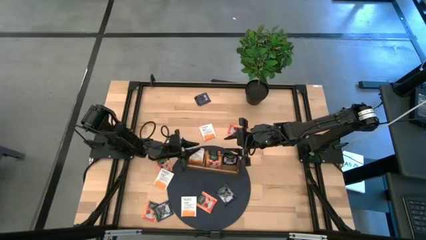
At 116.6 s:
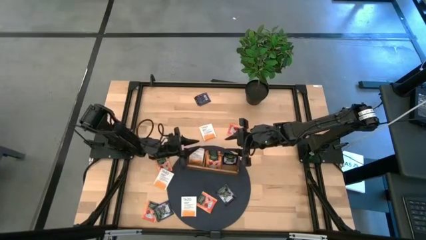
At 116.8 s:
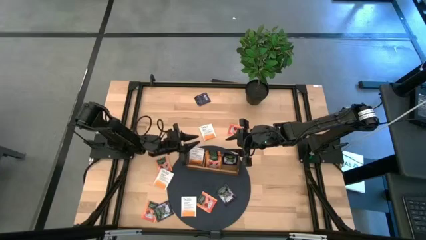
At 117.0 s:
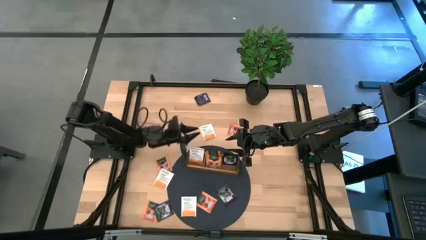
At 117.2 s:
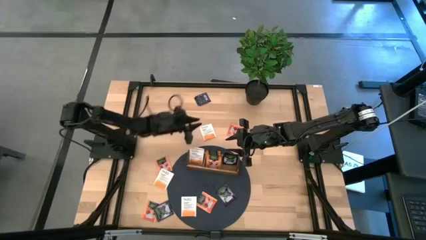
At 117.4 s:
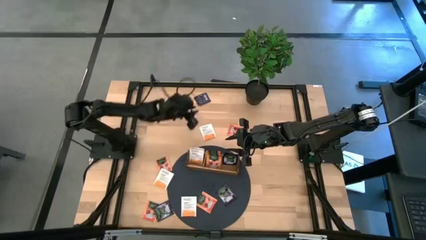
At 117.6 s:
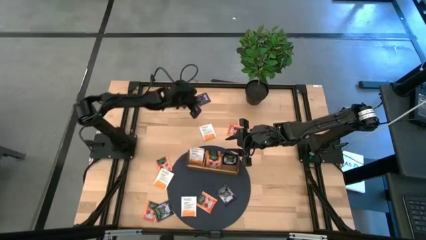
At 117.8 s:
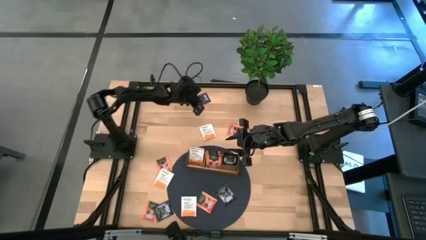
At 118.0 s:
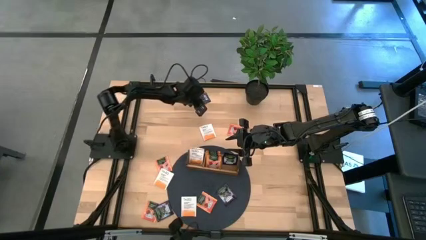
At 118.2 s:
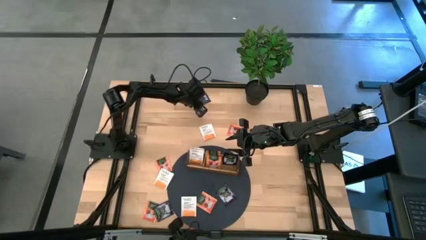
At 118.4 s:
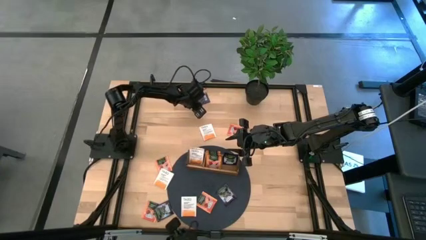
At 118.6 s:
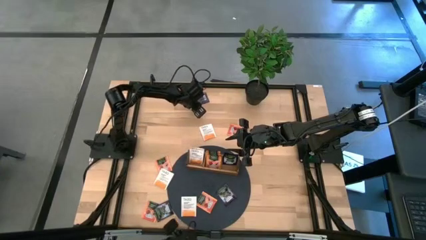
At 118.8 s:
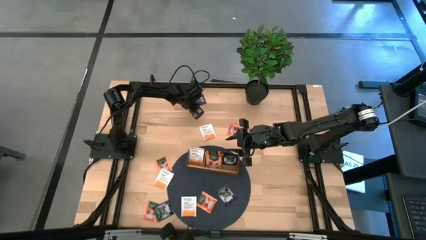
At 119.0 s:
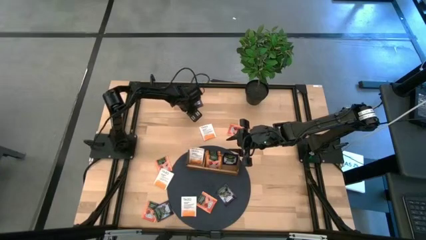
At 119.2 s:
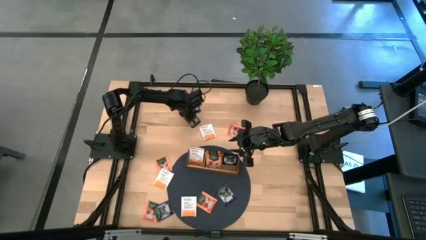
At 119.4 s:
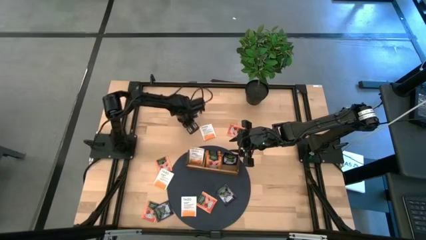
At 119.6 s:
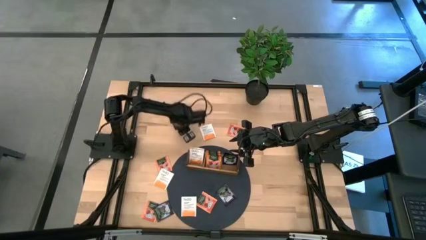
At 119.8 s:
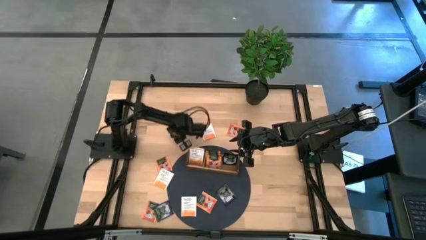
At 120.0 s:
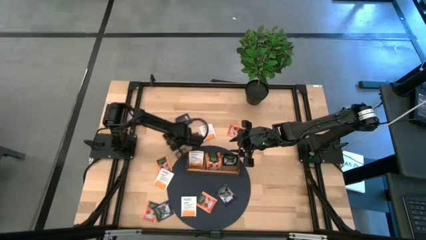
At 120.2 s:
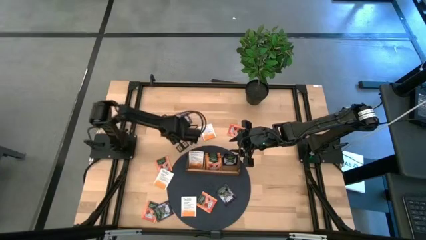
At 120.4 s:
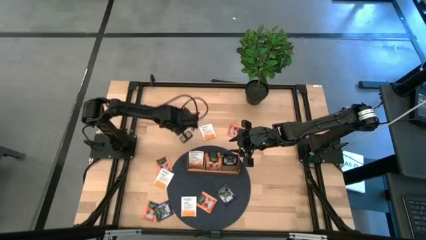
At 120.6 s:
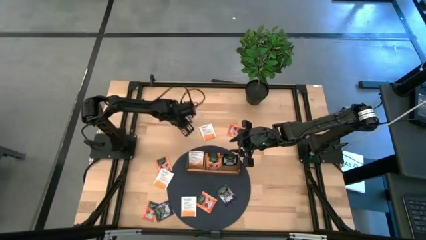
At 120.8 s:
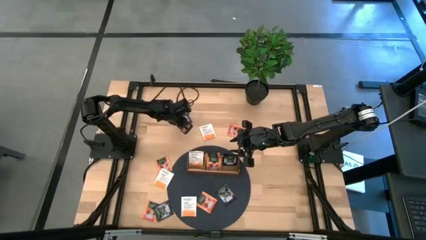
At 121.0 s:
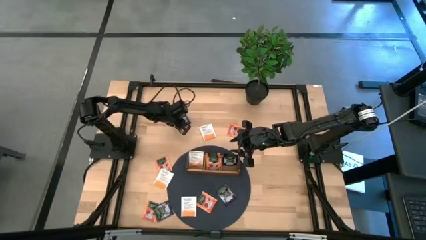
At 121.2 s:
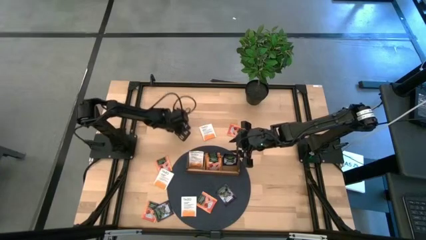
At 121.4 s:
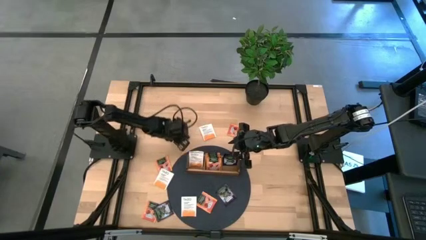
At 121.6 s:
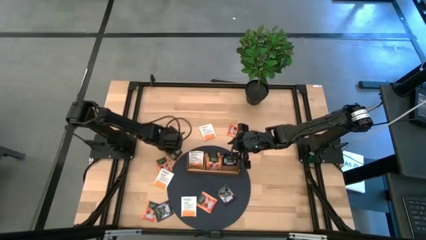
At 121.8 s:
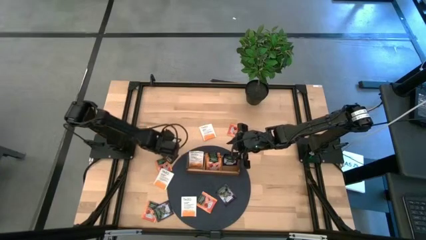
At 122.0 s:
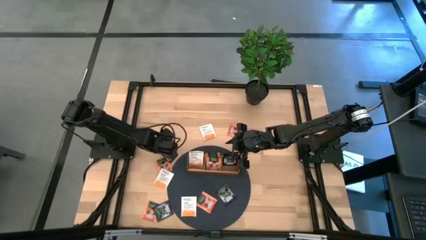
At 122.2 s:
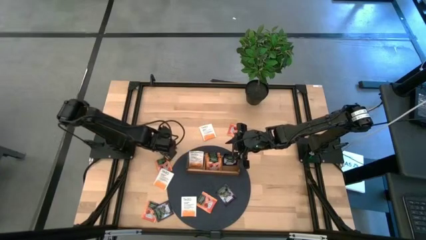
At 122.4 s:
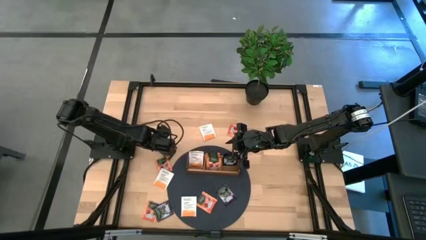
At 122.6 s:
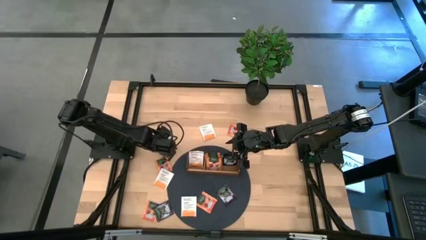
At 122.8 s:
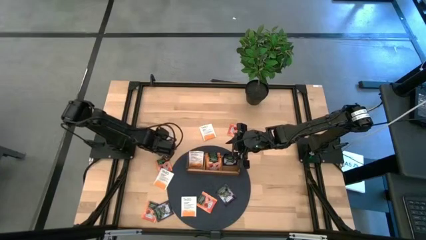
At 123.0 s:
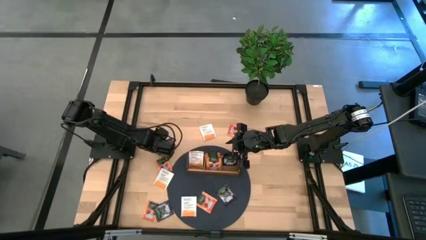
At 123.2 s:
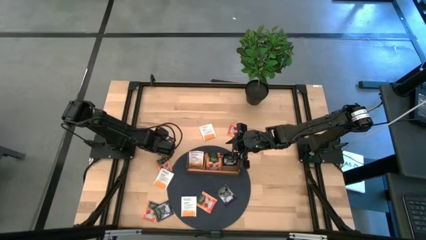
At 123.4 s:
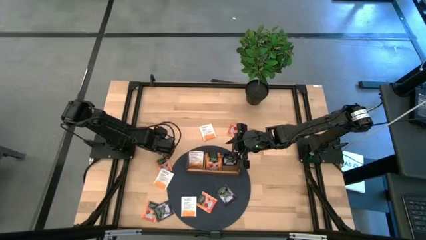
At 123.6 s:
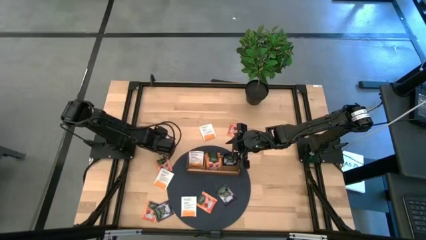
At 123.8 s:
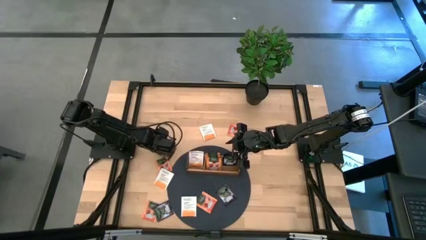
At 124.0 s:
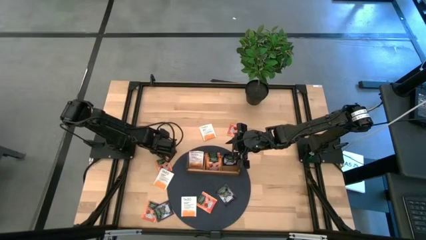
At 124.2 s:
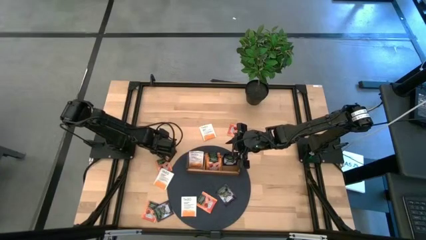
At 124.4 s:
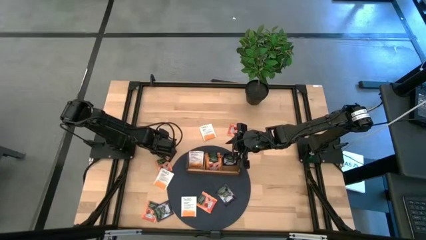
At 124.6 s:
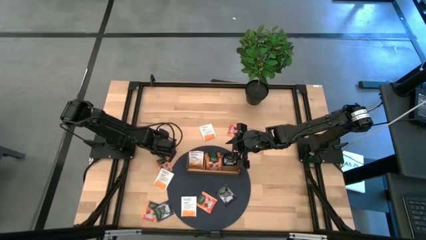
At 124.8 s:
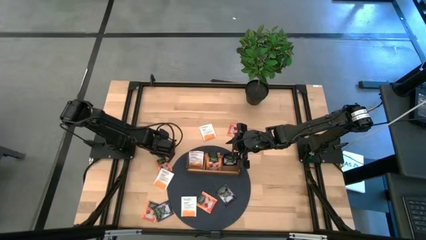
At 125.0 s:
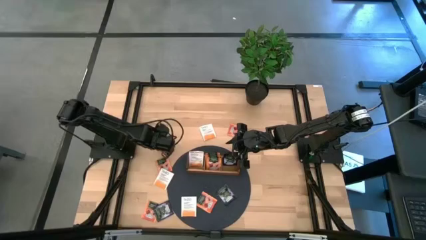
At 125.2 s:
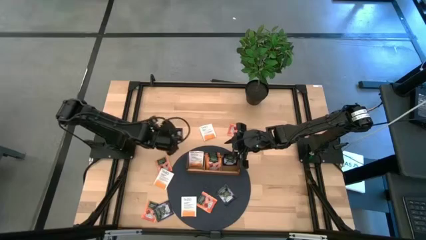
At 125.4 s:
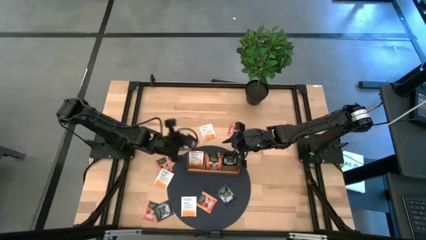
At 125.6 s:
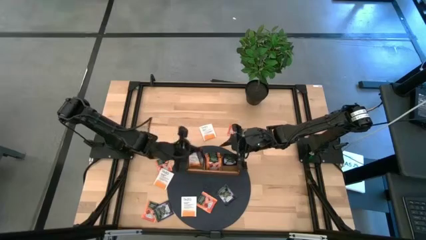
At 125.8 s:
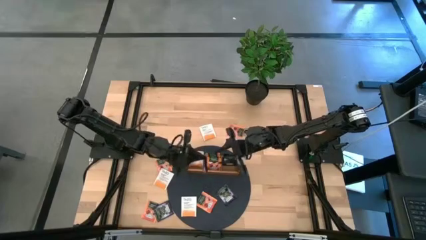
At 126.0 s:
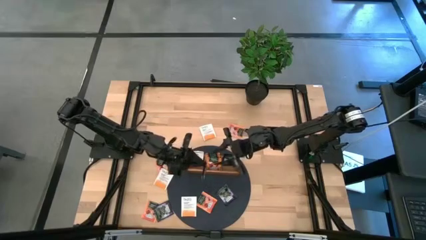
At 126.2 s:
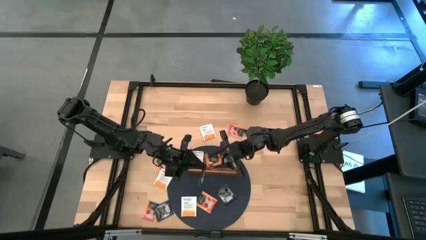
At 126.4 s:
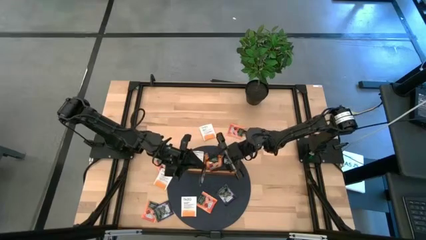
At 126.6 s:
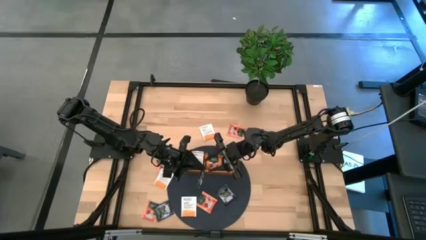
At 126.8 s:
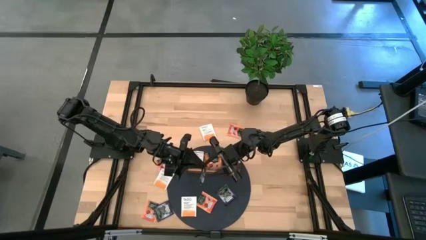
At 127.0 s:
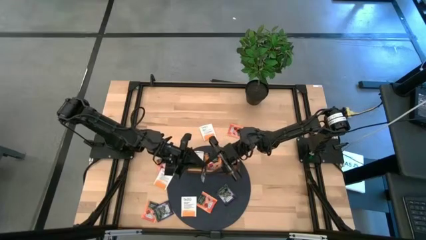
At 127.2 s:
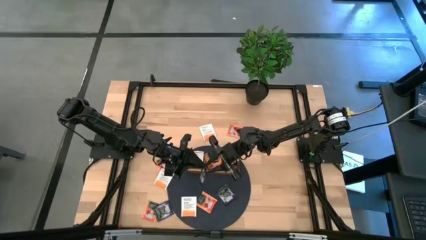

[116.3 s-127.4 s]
Task: Pick & Place Tea
Put the black white tea bag into the right section of the wooden organizer

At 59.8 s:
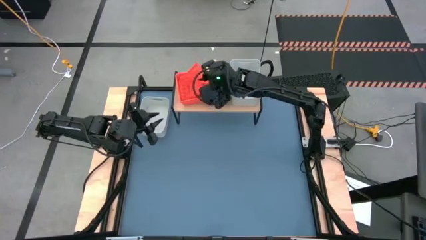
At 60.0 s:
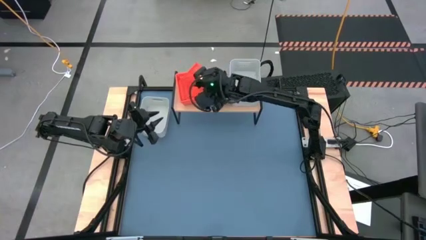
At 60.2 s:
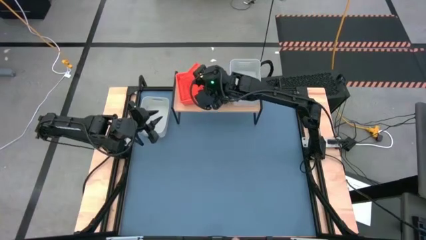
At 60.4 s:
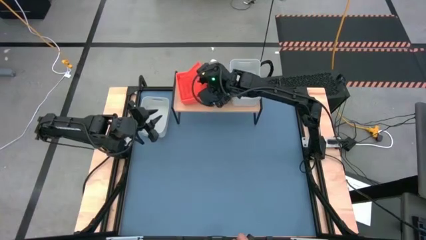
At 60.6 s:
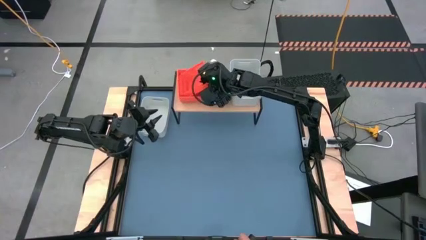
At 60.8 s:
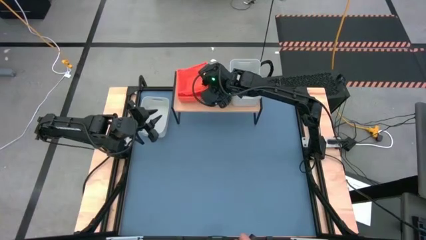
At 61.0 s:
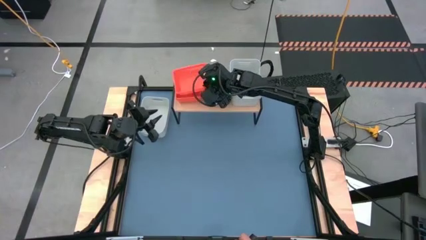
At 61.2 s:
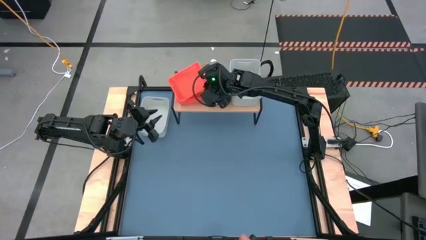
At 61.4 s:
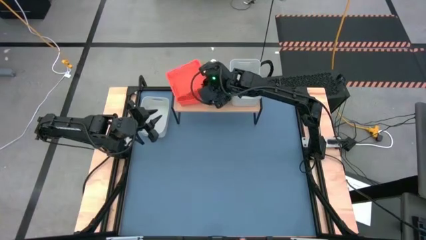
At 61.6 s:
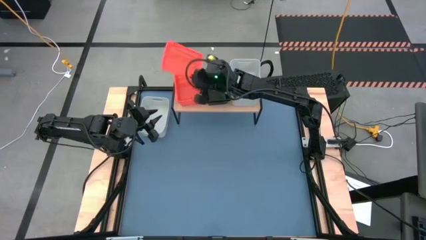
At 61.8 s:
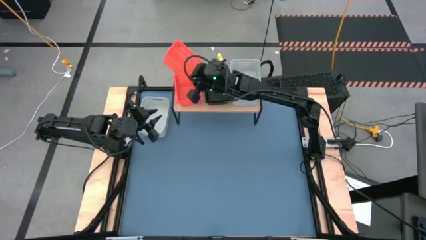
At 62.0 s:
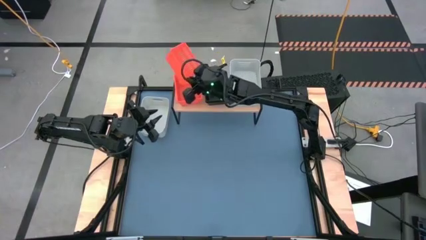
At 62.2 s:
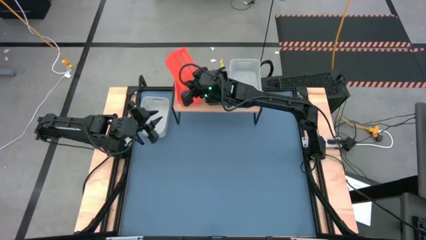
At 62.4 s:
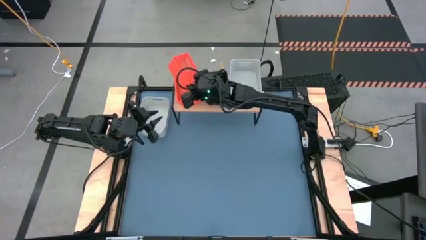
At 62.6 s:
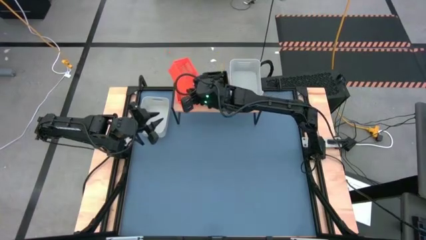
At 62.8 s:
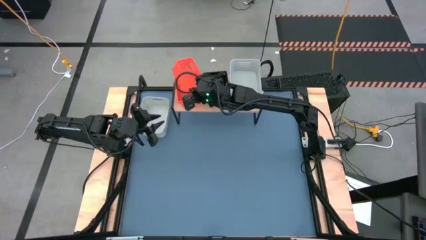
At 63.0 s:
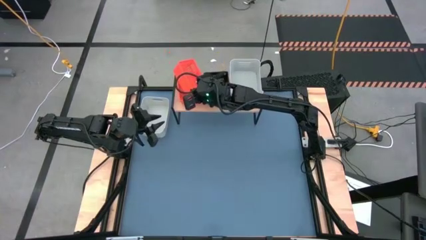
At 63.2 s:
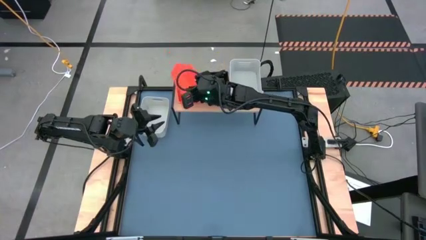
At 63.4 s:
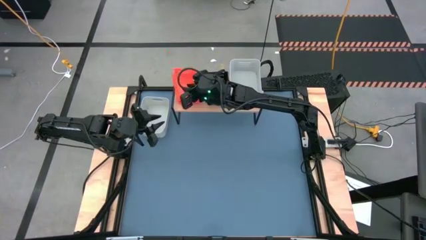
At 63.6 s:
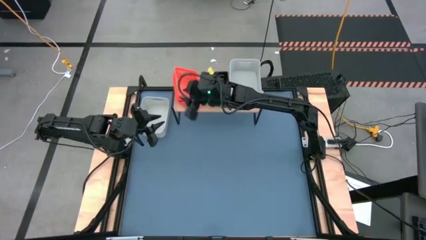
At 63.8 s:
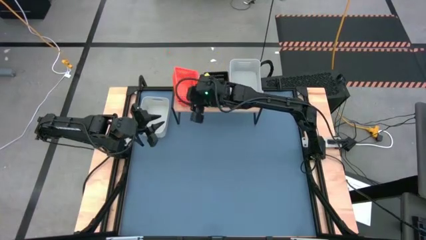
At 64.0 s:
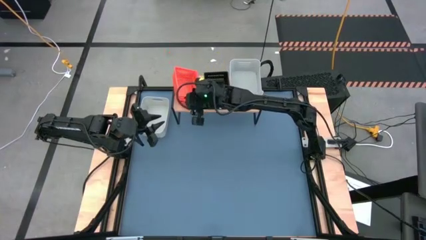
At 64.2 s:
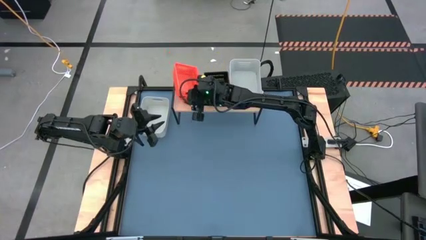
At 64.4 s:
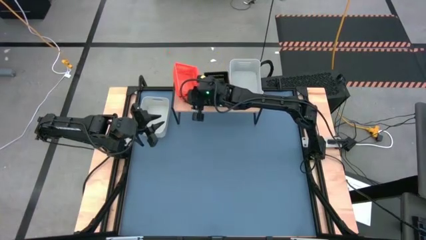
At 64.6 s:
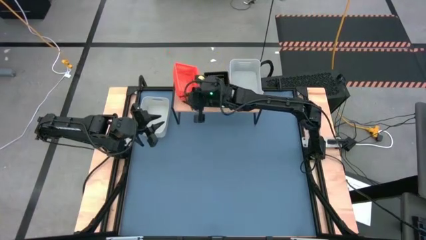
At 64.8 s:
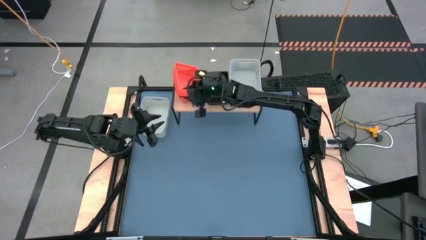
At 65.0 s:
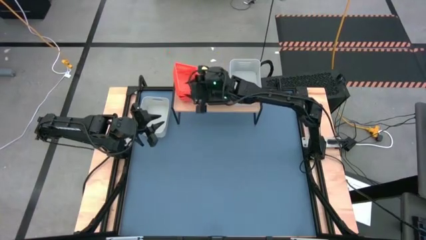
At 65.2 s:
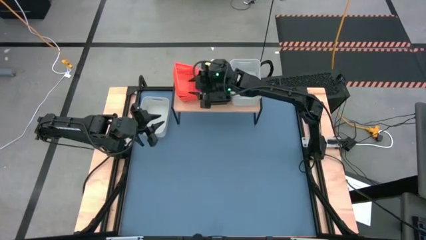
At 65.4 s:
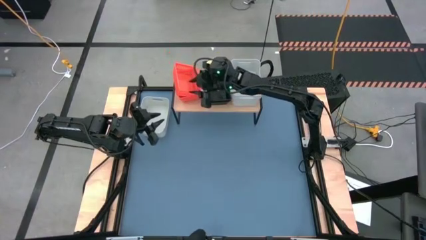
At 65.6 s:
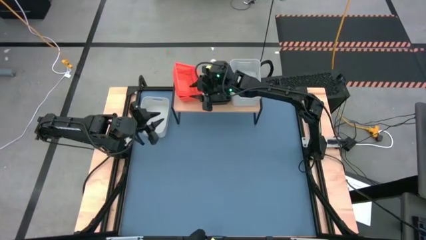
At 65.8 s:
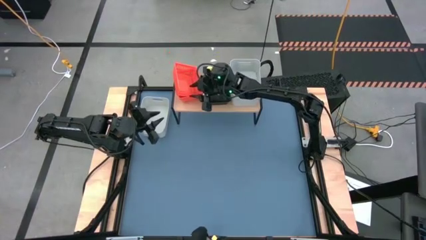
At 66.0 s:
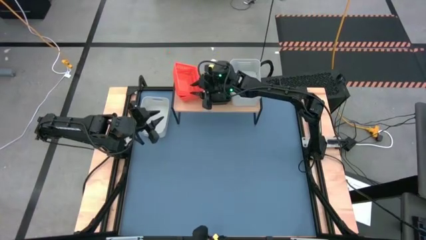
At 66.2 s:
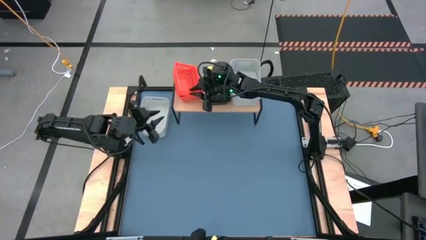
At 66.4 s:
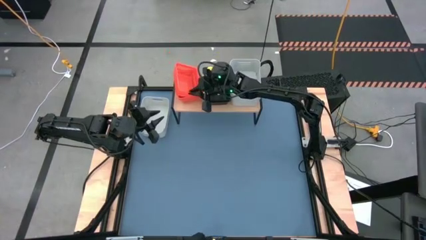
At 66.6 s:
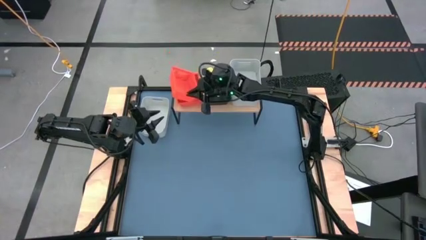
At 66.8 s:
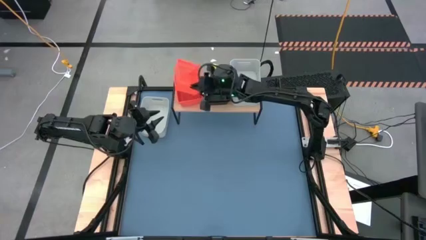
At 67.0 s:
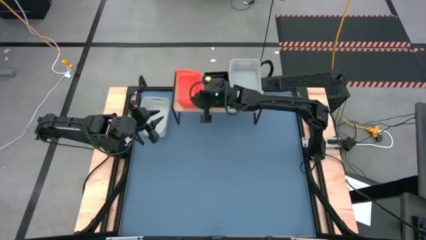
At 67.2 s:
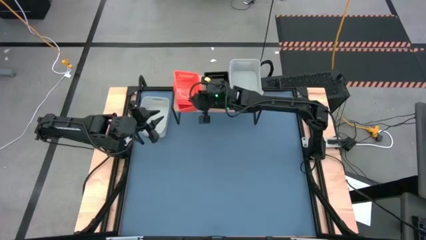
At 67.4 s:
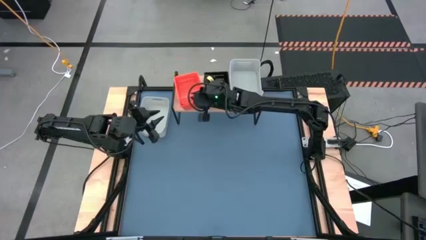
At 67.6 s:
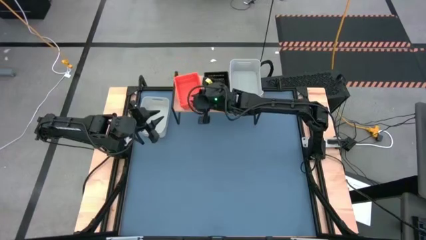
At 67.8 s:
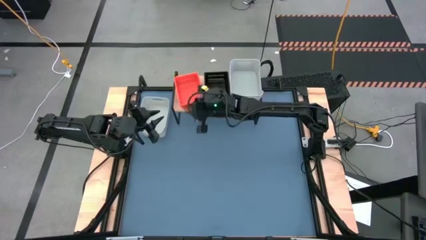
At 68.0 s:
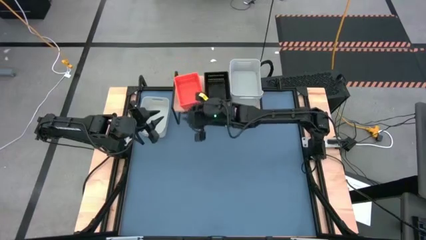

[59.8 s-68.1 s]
Task: Stack baskets on shelf by color
Stack the orange bin on top of the other orange bin on the shelf
